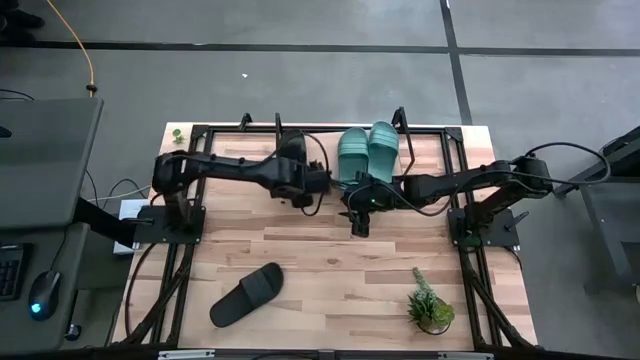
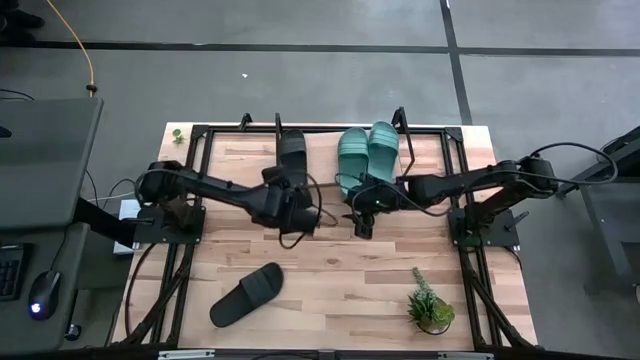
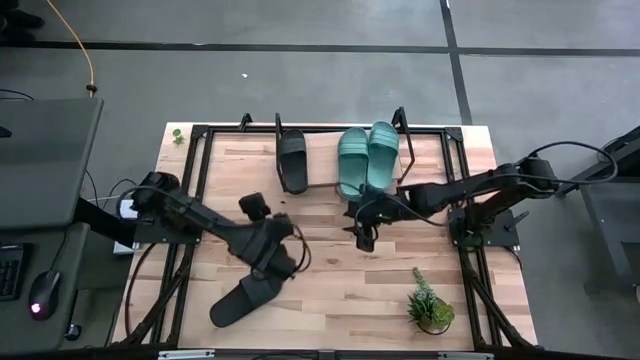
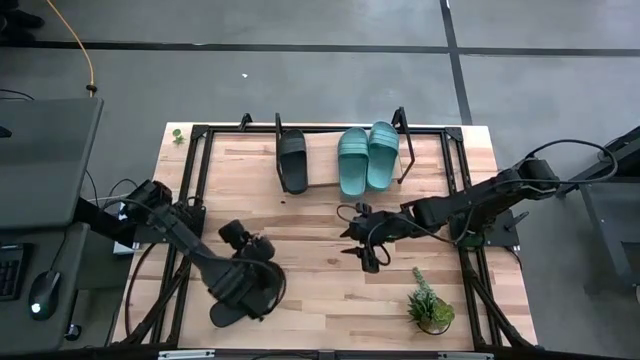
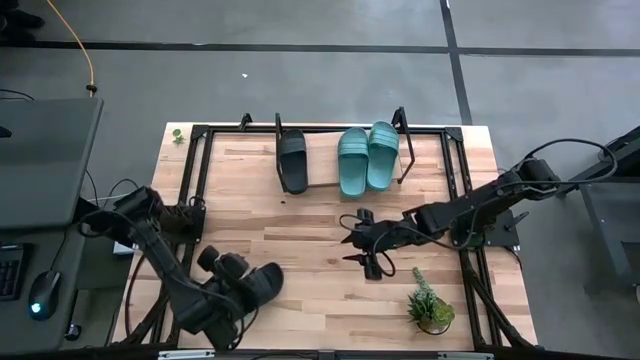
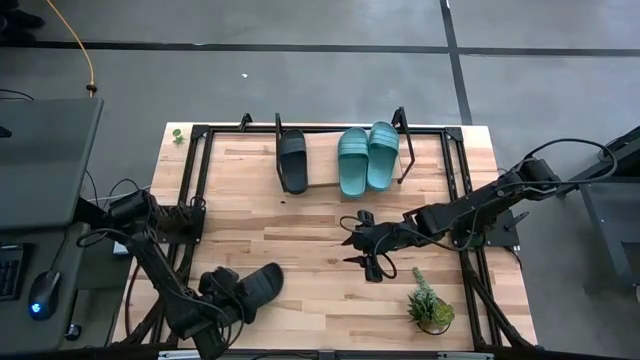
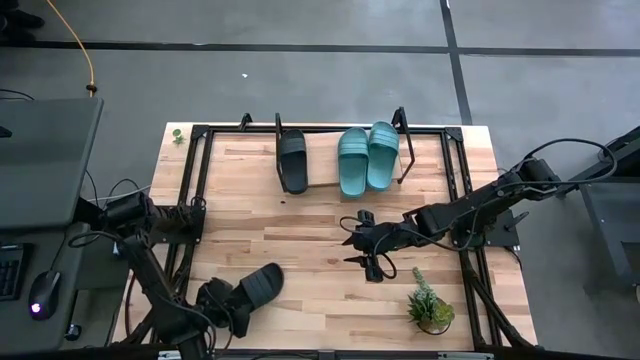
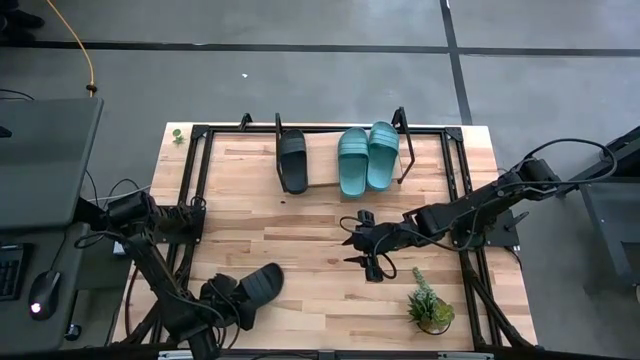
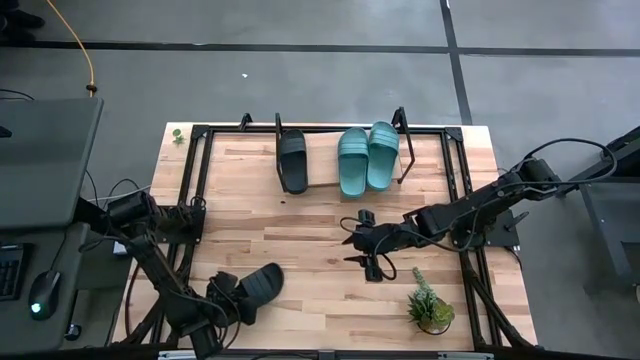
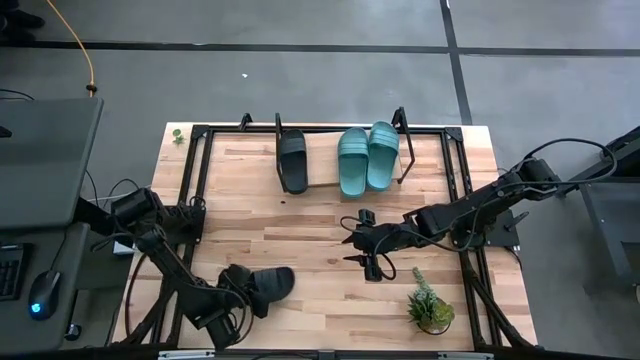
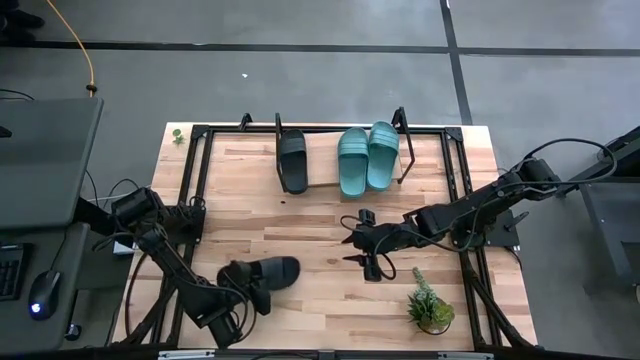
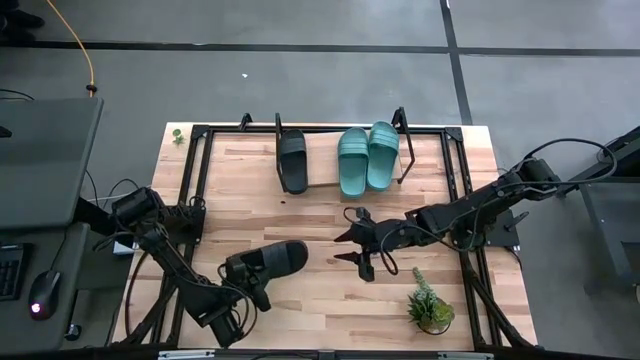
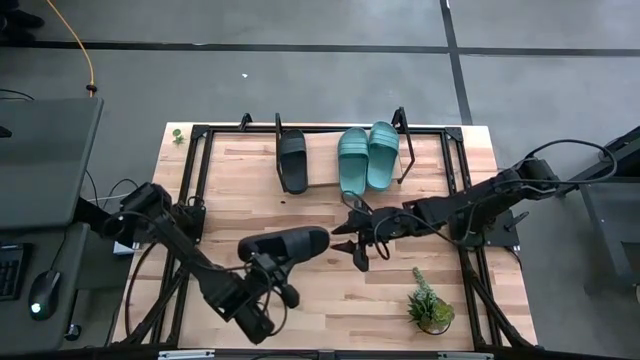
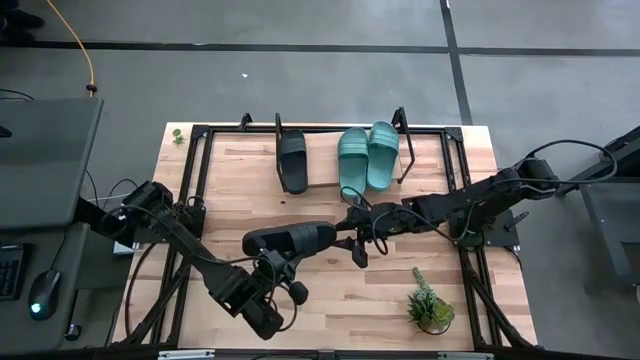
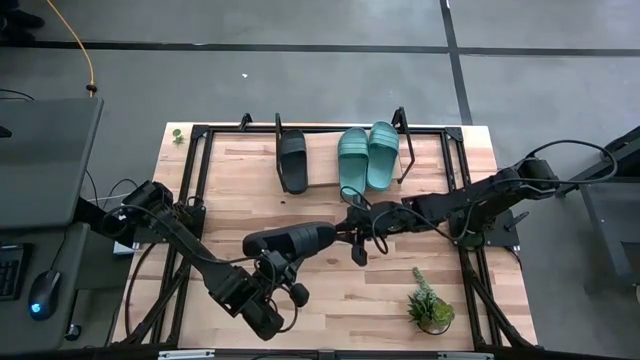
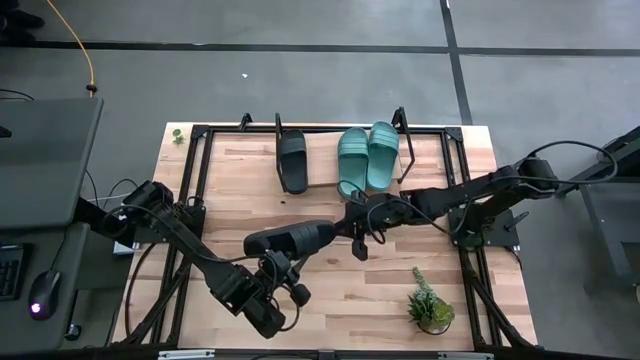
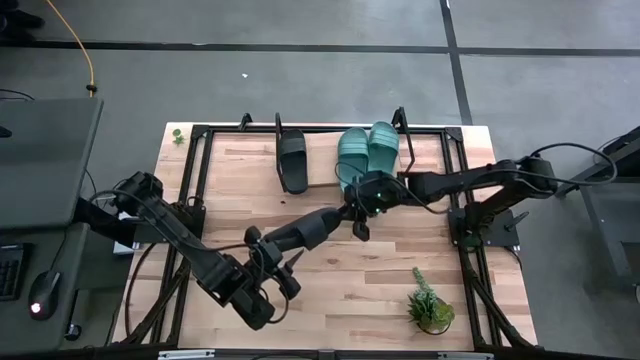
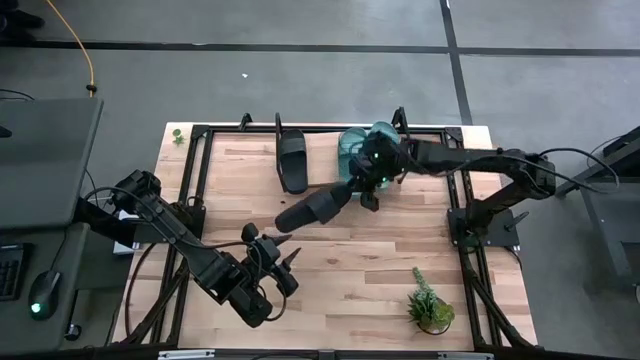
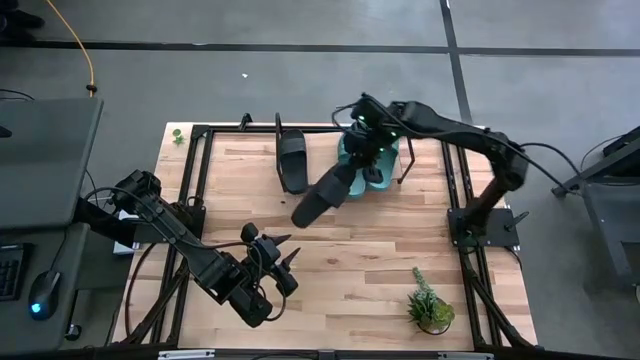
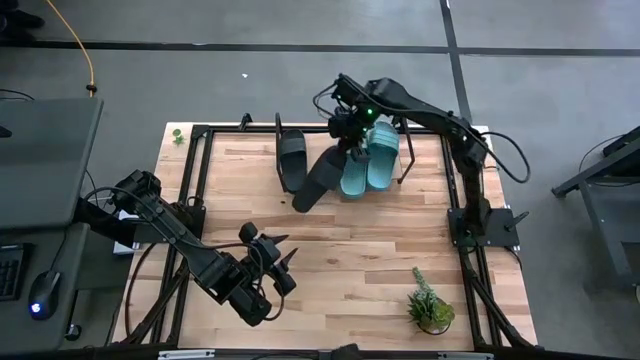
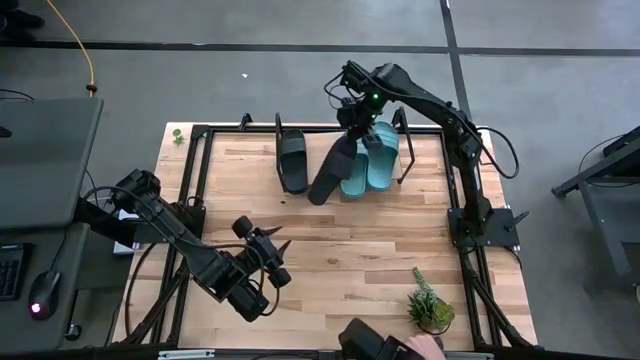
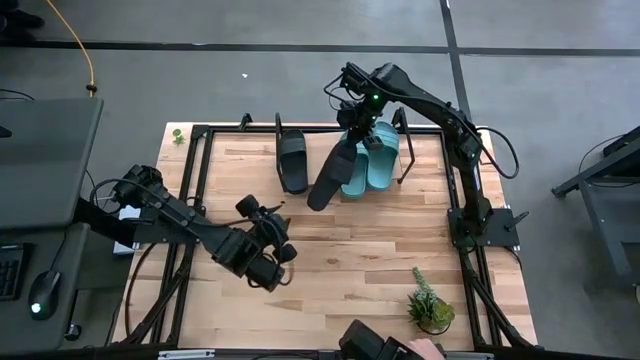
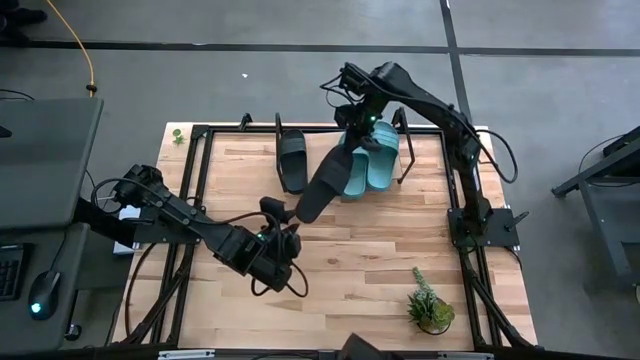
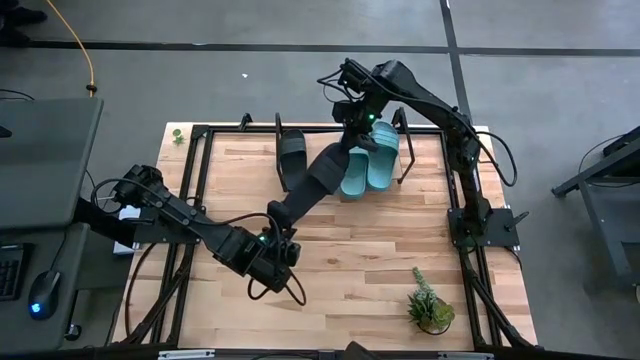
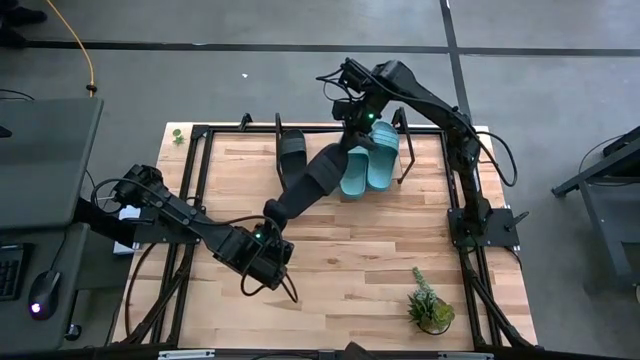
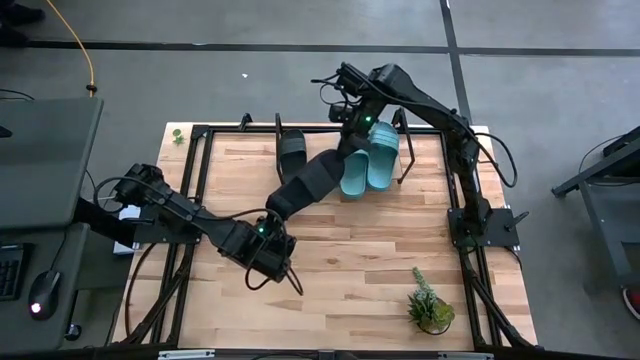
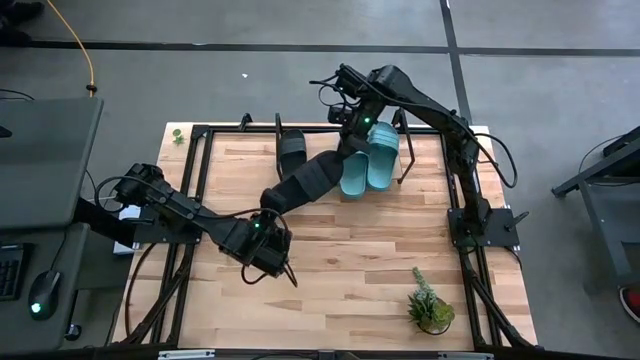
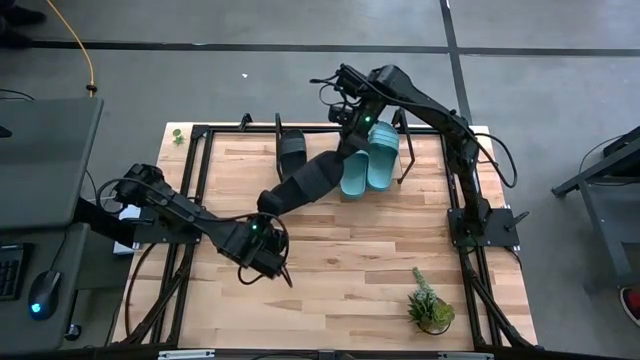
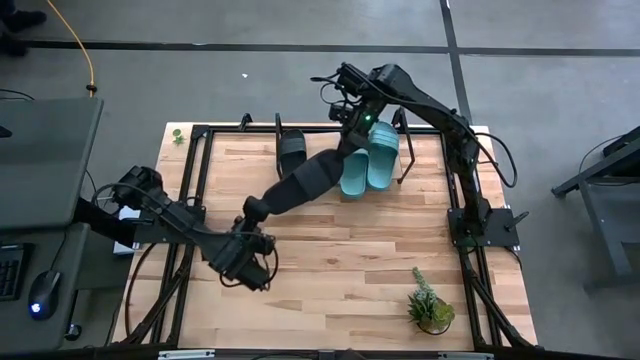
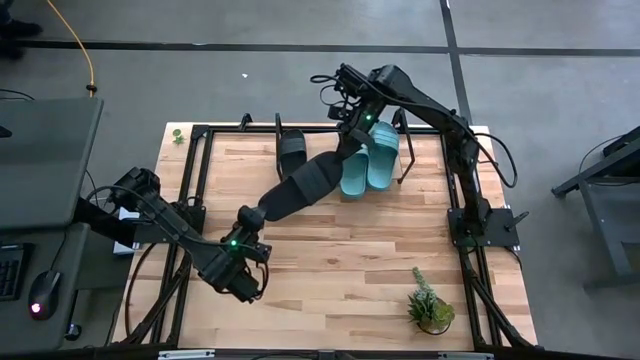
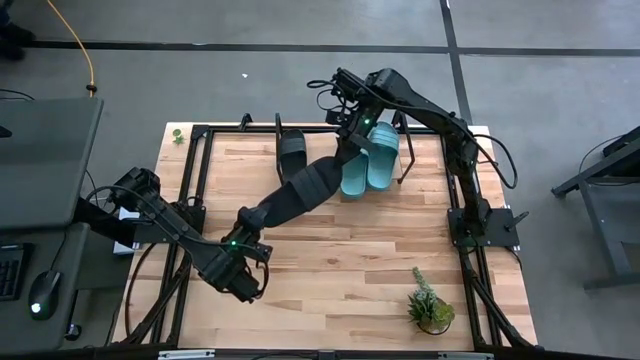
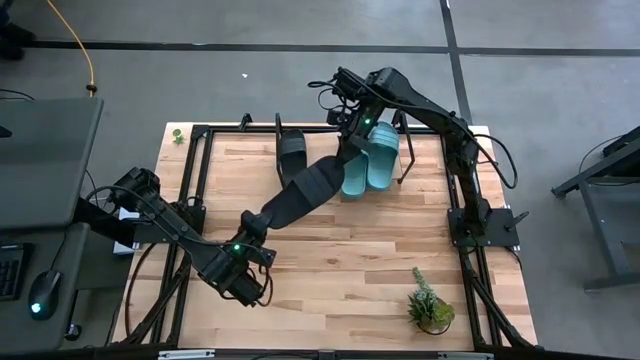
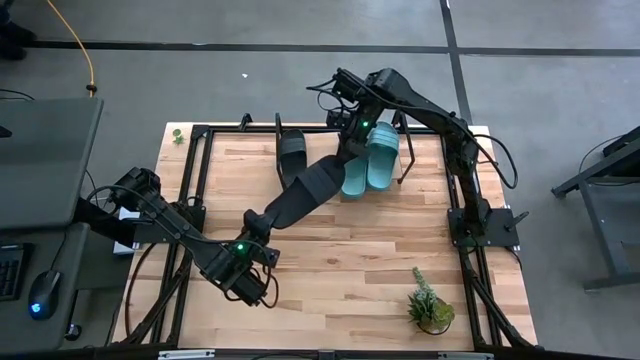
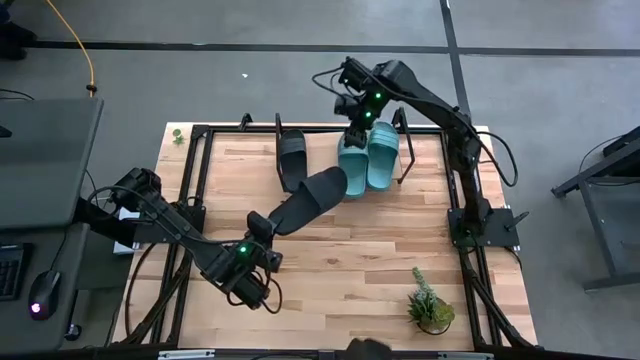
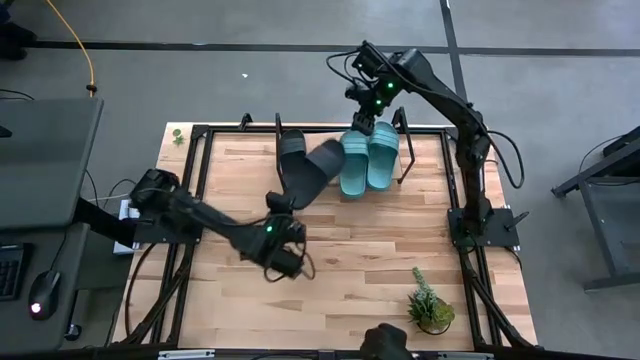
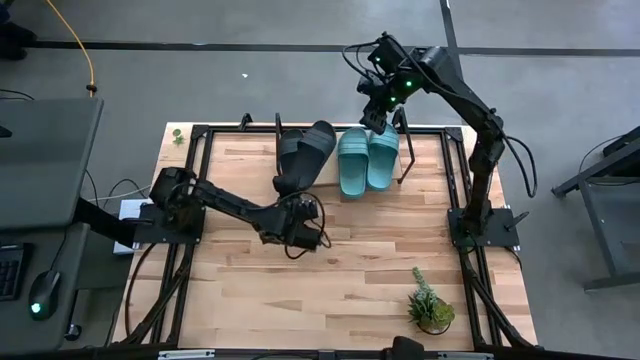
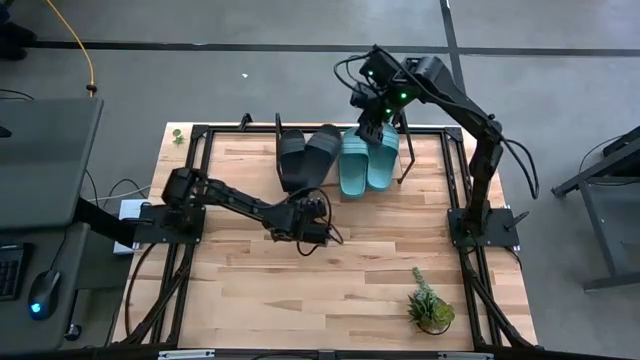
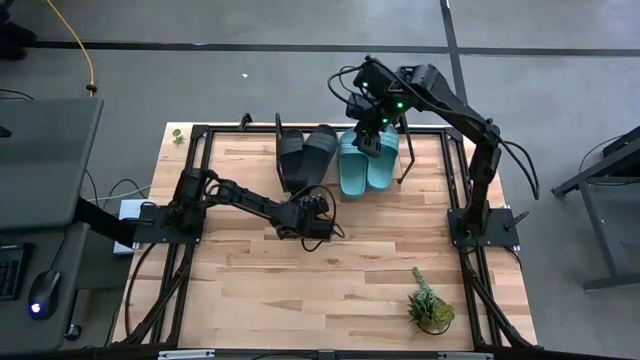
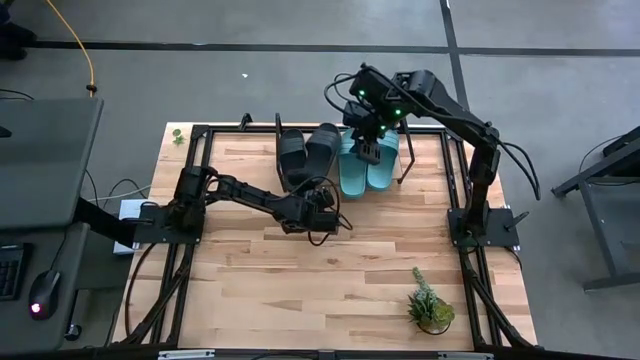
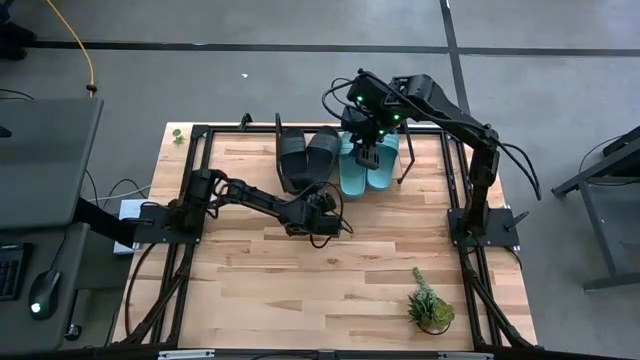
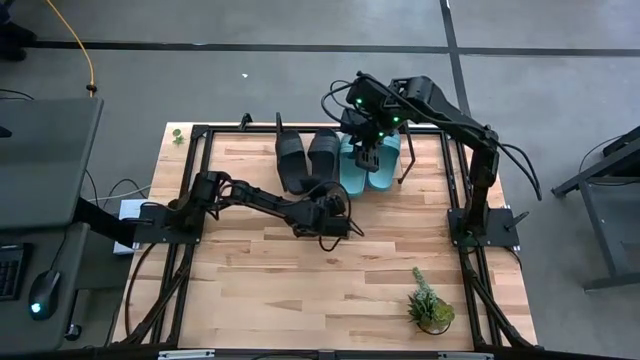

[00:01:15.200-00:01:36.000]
Task: Pick and place slides into the shelf
Put the black slipper on the shelf
